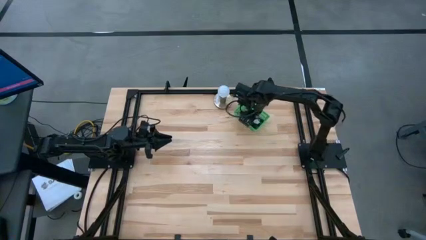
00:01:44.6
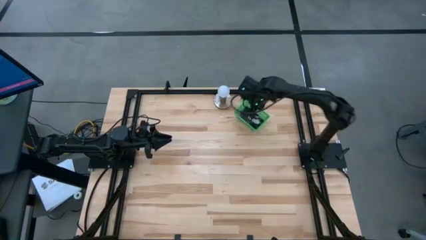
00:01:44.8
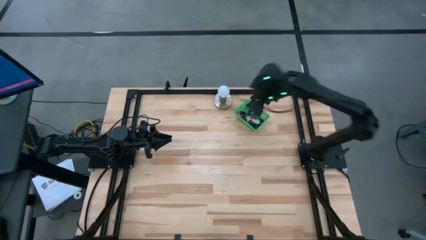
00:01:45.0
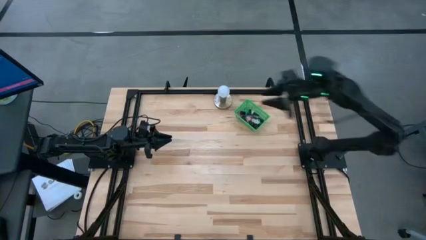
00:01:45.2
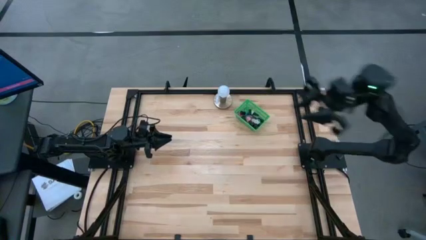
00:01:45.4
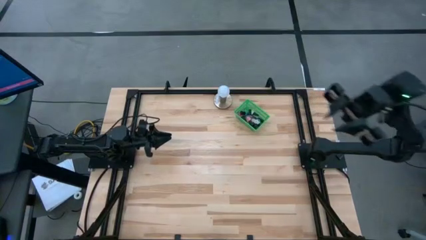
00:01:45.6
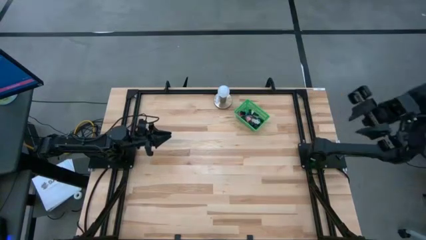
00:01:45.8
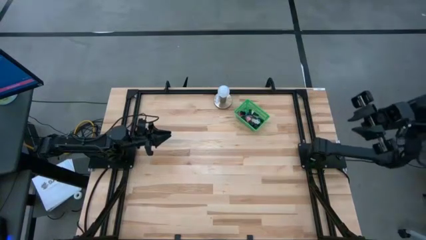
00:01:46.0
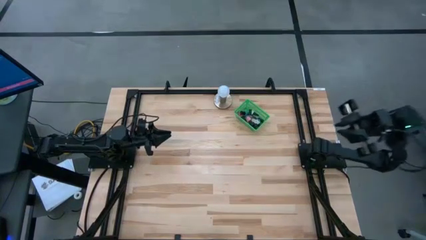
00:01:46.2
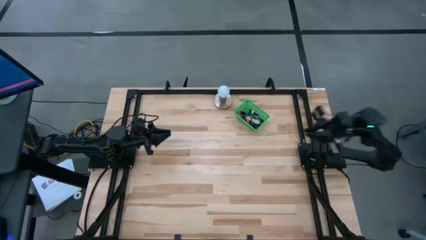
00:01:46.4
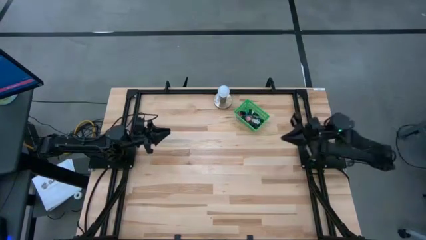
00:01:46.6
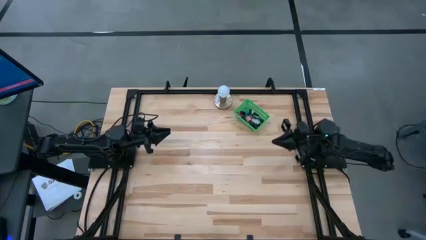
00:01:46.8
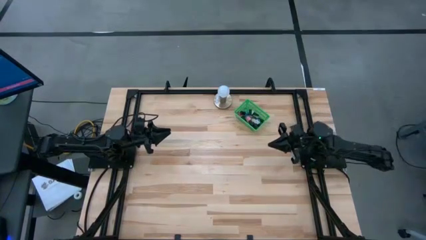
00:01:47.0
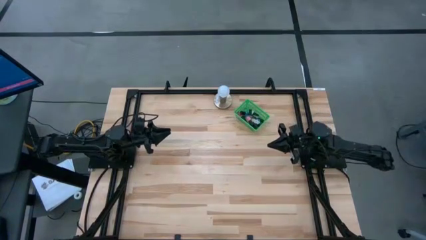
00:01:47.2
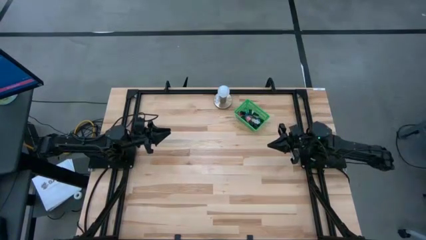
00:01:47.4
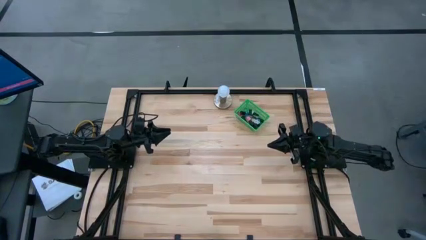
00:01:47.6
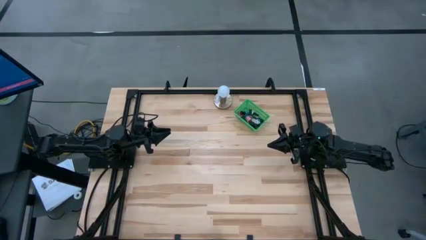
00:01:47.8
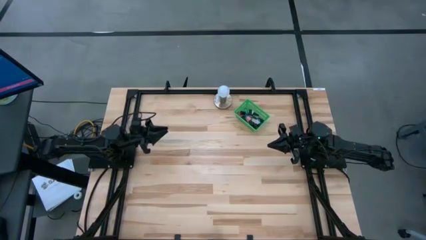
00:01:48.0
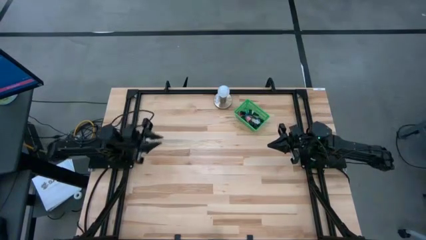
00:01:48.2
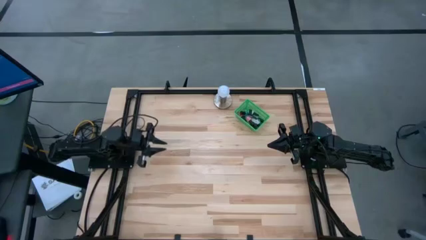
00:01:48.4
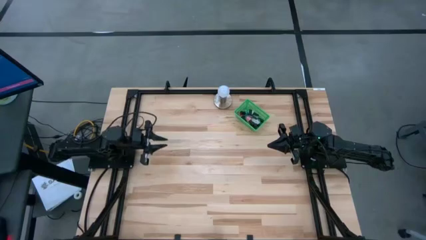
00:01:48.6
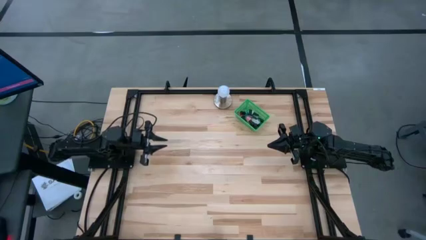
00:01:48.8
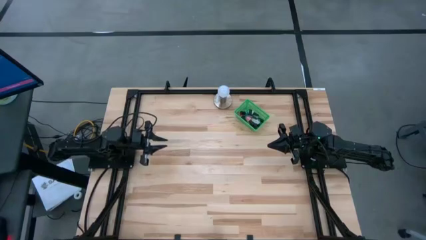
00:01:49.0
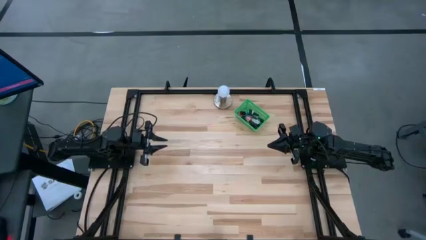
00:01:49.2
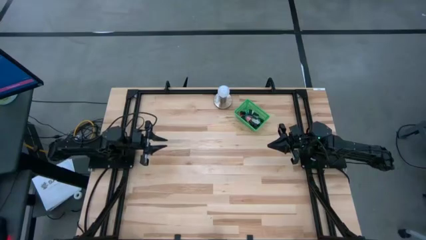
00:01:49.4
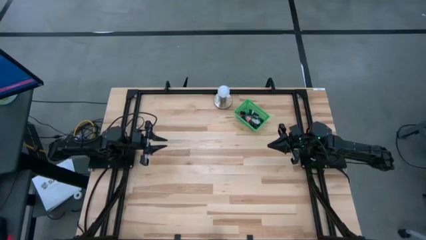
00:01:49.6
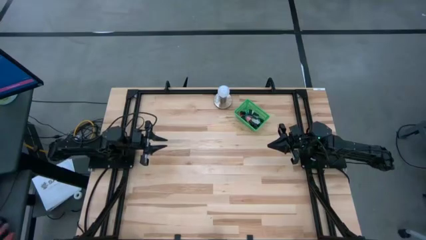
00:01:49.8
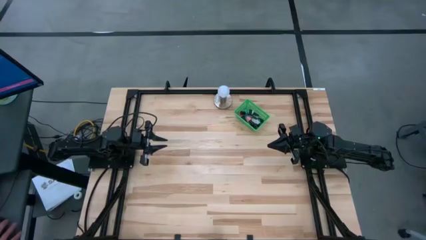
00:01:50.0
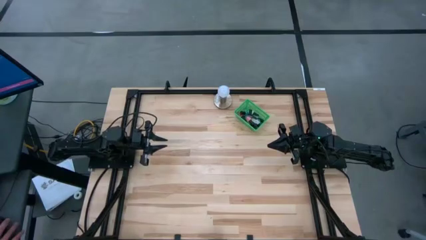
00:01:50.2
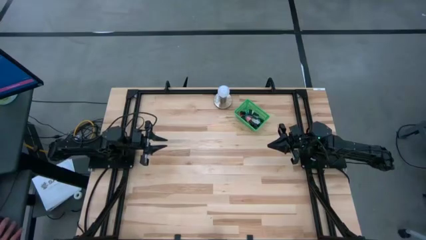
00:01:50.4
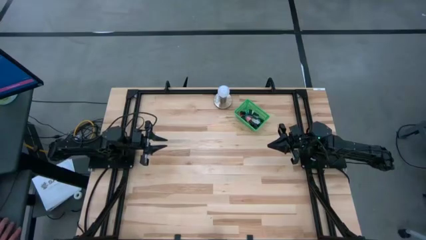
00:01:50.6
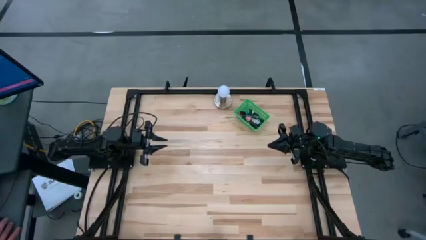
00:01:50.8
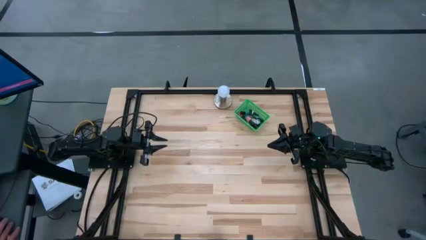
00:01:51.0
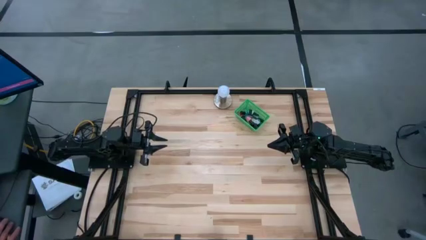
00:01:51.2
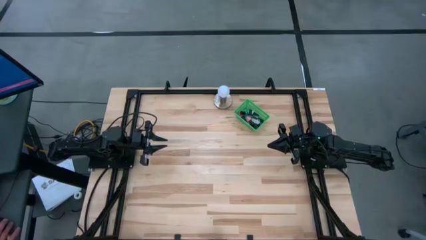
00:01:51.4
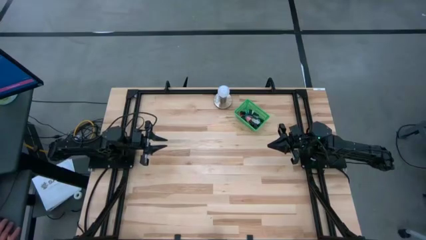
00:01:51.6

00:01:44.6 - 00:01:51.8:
Task: Pick & Place Nail Polish
Return to Home Position

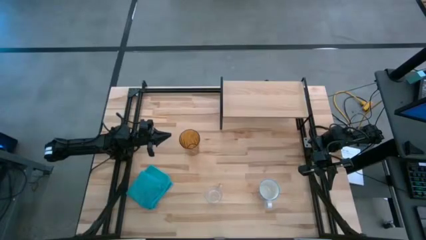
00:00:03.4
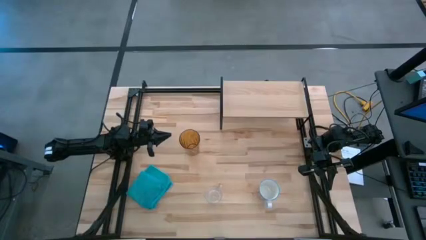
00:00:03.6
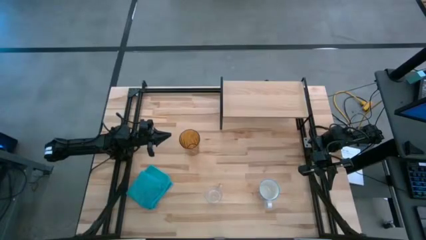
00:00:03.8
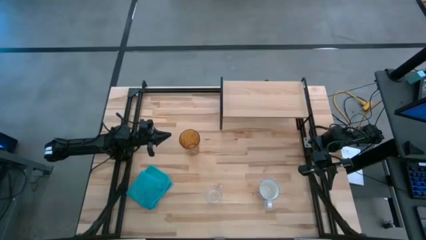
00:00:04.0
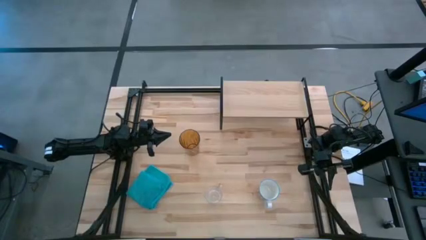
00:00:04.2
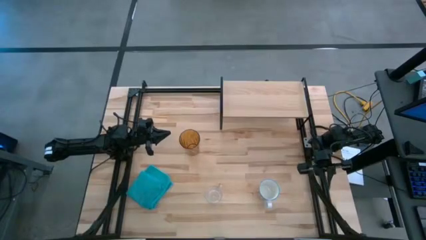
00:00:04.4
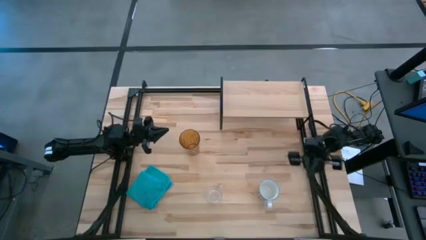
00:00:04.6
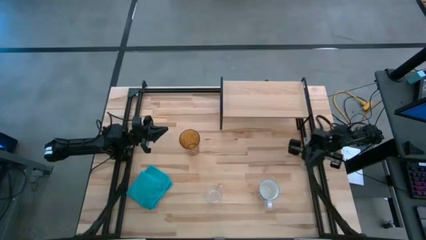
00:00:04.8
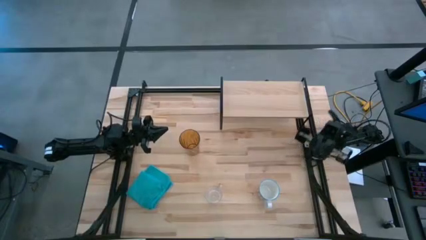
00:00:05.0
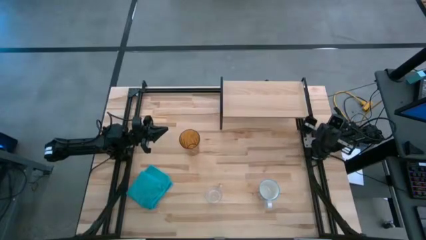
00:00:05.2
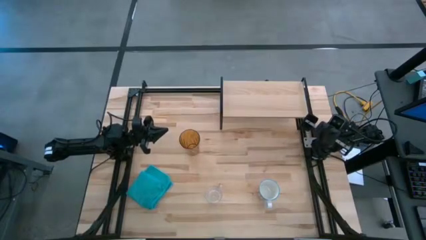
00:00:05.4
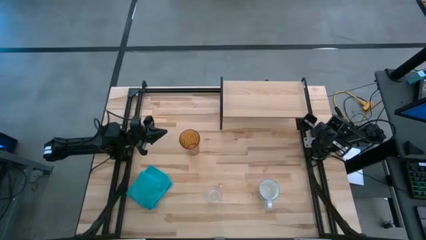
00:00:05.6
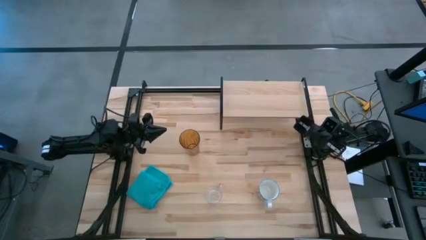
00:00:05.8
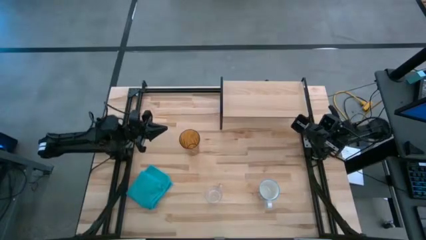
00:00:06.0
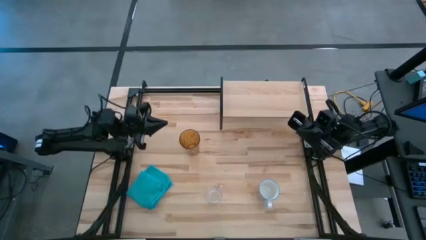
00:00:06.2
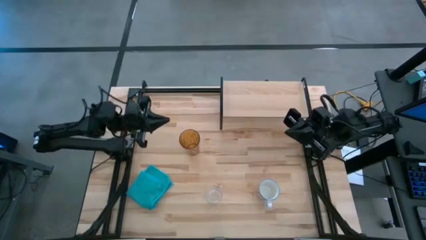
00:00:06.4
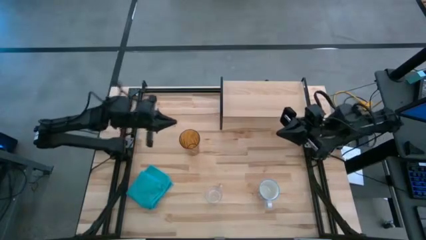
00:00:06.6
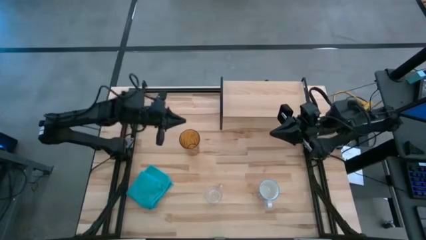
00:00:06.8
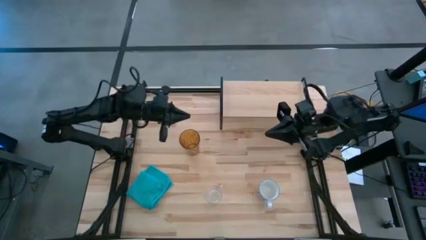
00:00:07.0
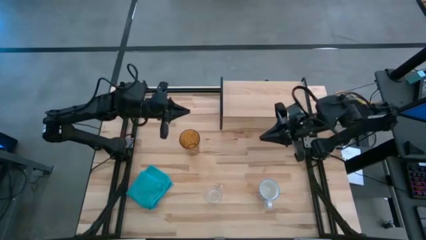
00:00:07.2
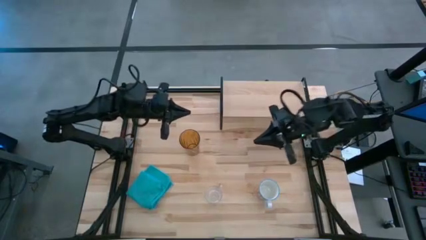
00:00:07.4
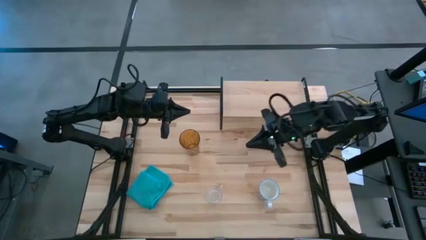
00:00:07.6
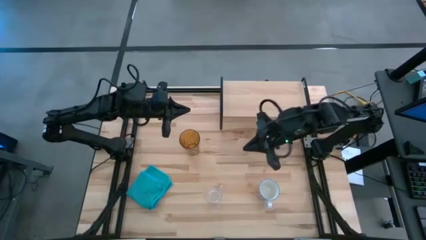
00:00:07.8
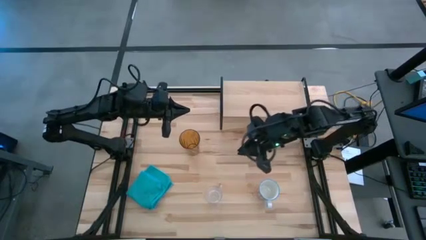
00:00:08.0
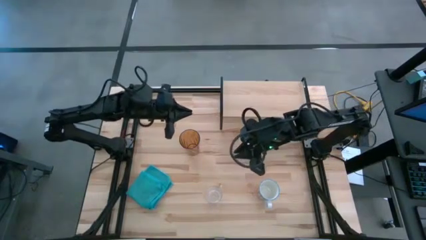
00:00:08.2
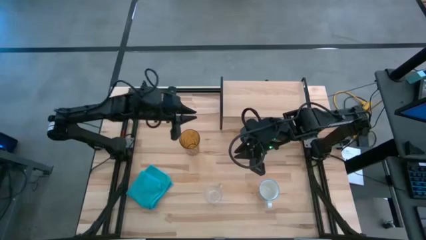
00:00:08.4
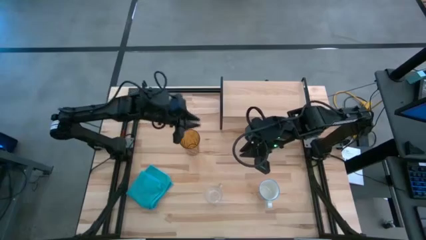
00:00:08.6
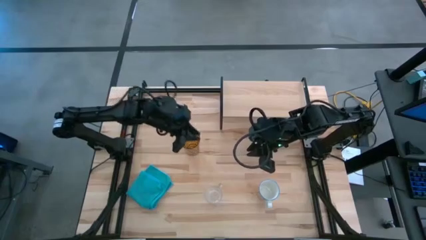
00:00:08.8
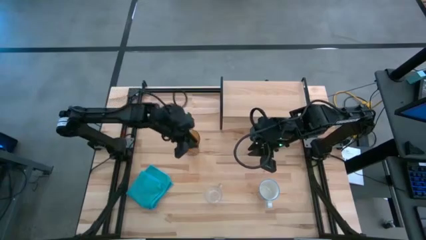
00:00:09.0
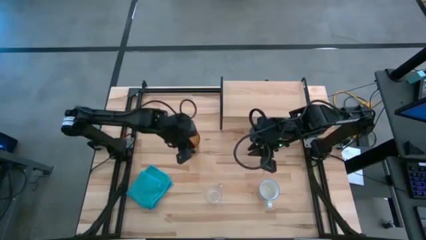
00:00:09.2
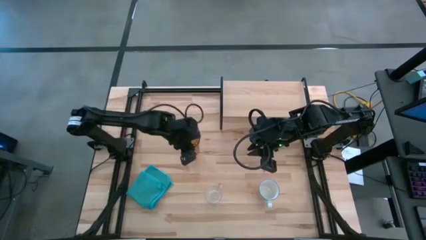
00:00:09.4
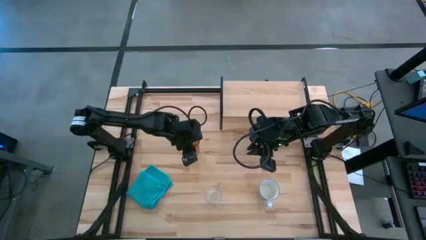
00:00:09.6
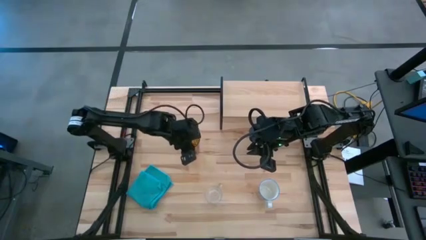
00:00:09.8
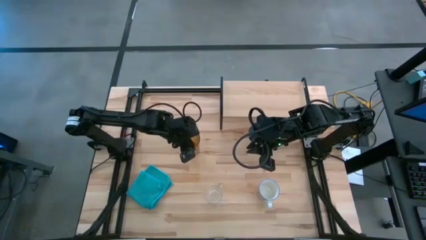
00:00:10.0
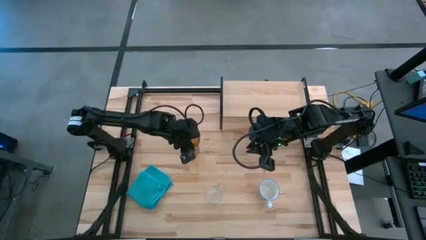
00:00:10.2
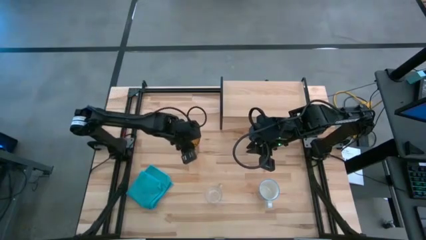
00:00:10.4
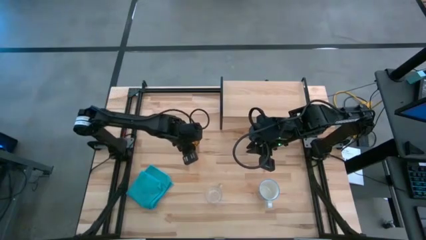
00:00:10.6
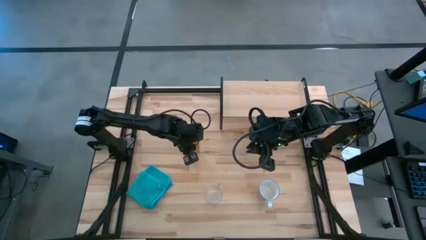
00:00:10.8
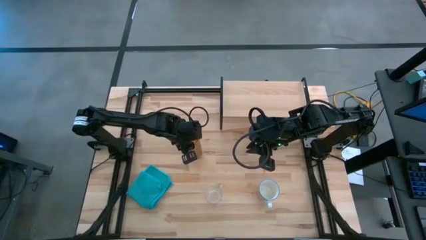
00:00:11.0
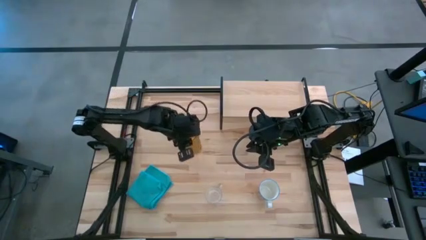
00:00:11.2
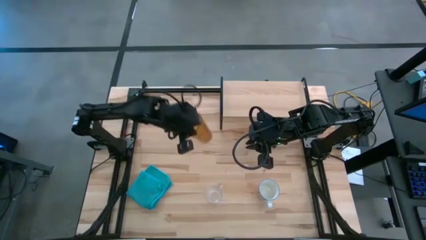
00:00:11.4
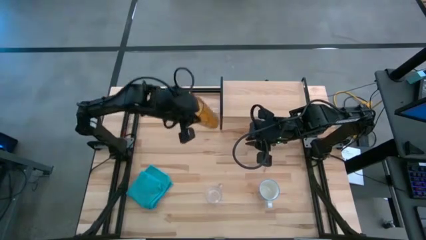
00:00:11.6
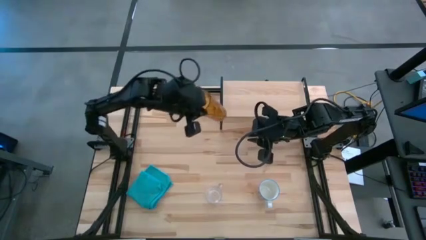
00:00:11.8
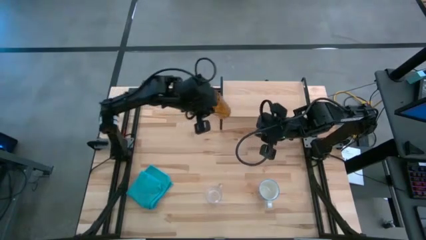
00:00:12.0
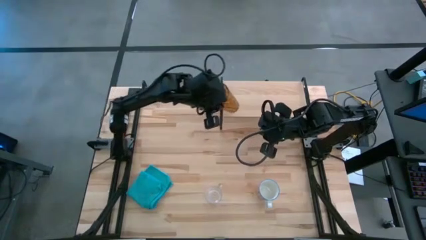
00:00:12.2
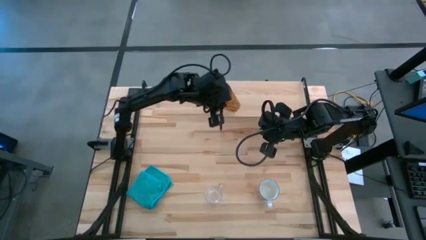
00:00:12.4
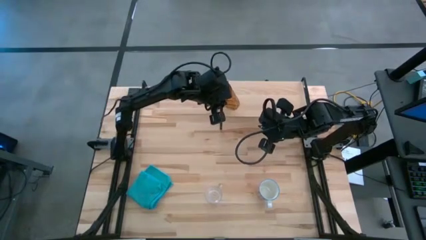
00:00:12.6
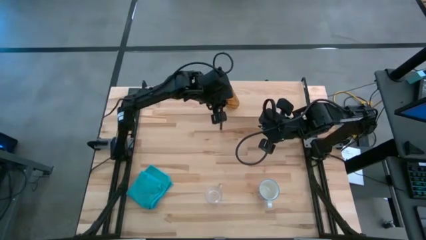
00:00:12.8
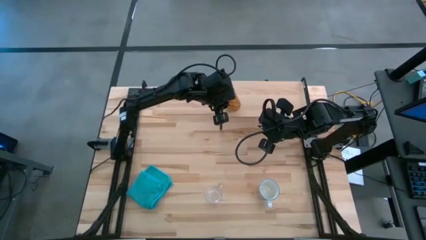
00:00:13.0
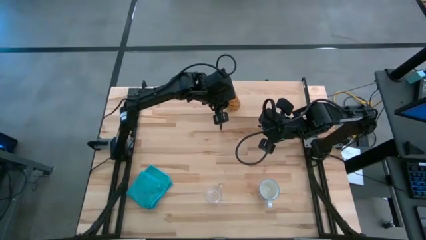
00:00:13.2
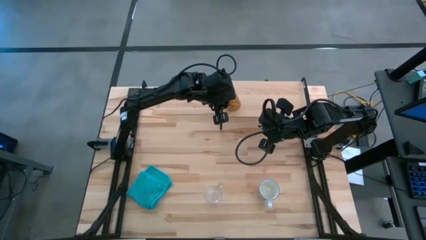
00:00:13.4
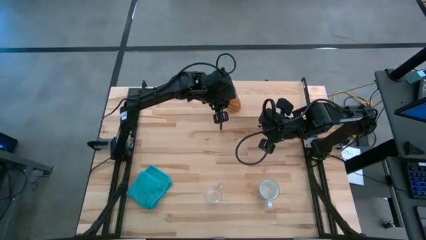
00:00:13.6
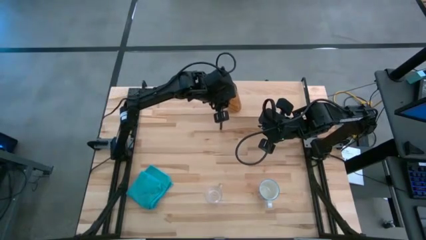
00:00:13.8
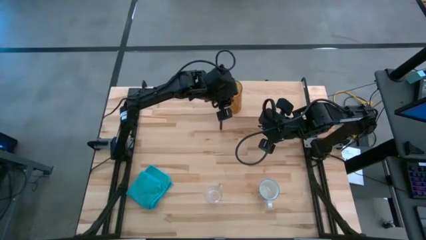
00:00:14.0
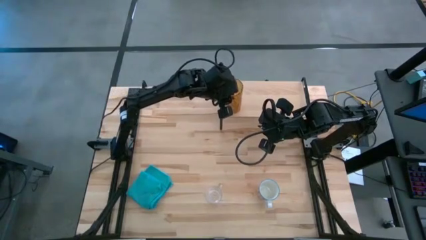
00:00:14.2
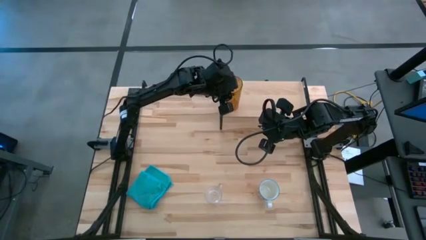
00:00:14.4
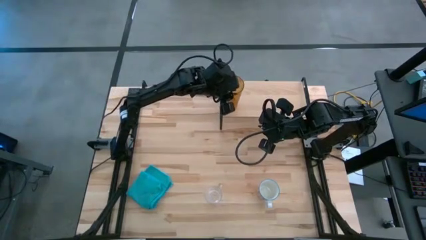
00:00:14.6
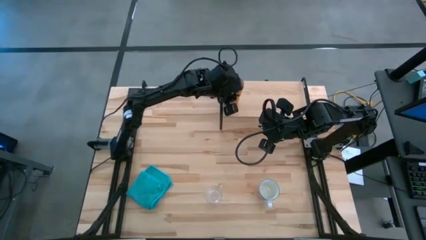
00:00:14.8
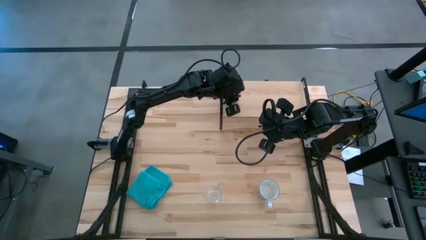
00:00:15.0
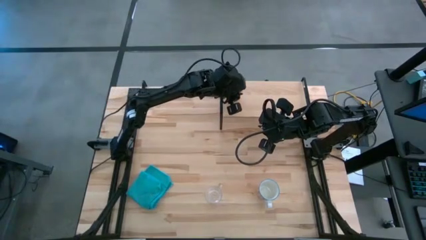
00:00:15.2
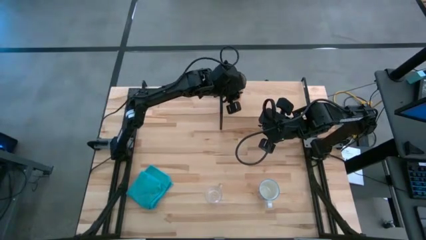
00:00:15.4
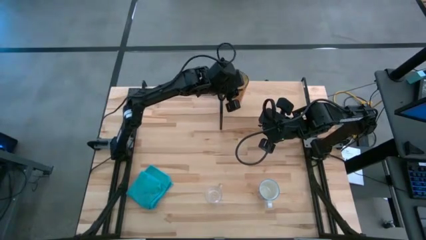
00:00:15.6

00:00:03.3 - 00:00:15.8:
Task: Stack small to large cups/mugs on shelf
Put the brown cup on the shelf
